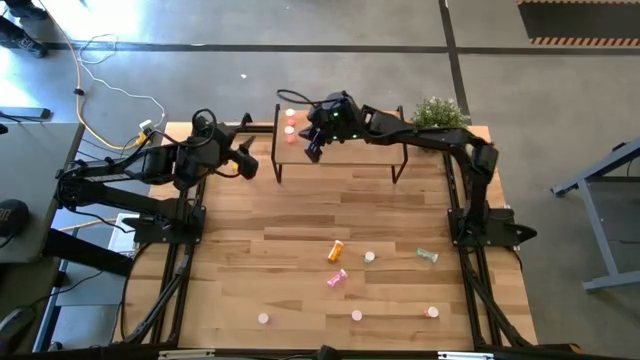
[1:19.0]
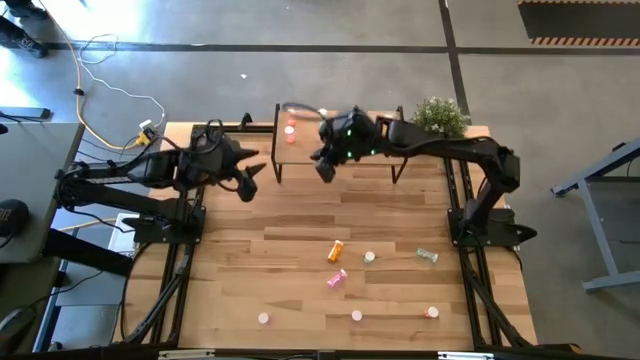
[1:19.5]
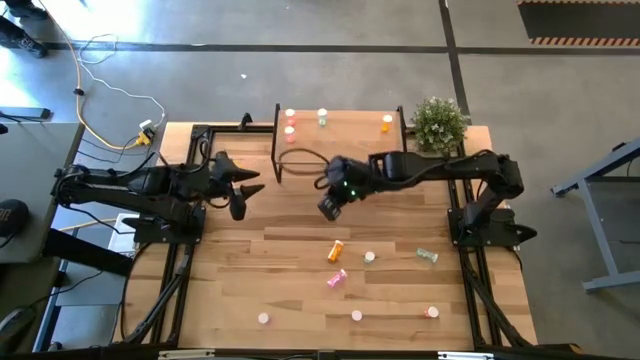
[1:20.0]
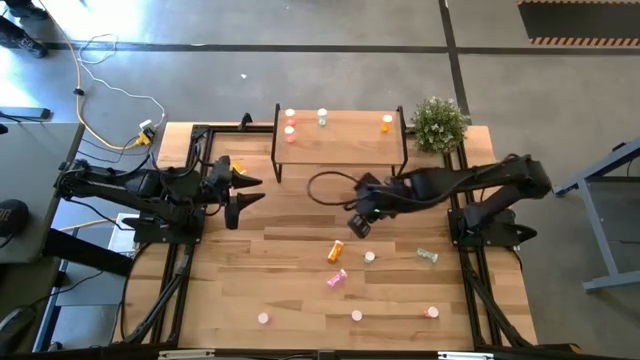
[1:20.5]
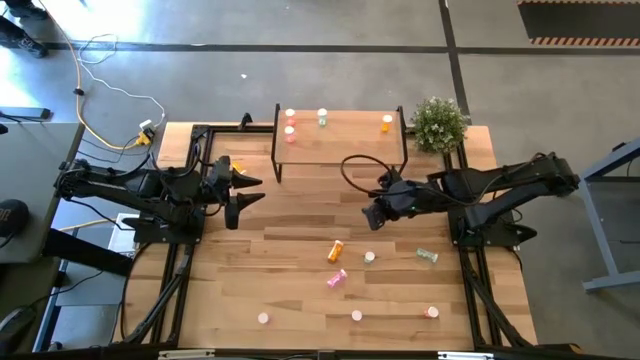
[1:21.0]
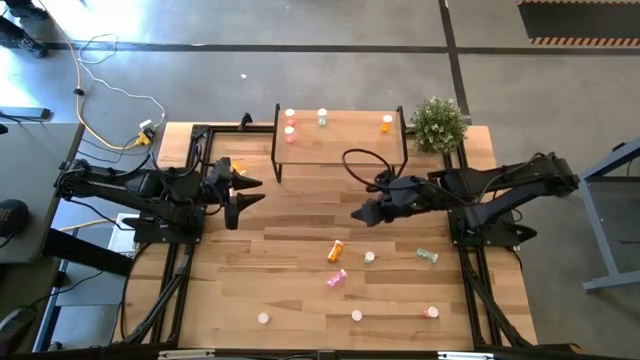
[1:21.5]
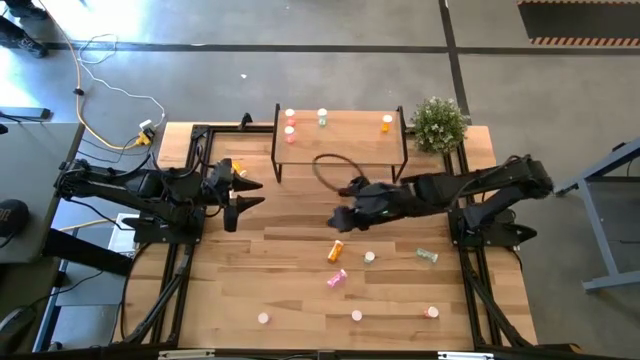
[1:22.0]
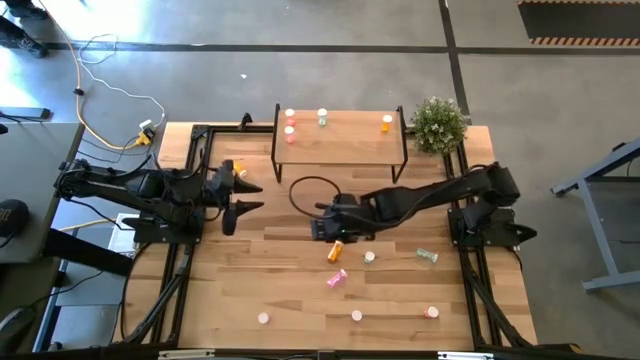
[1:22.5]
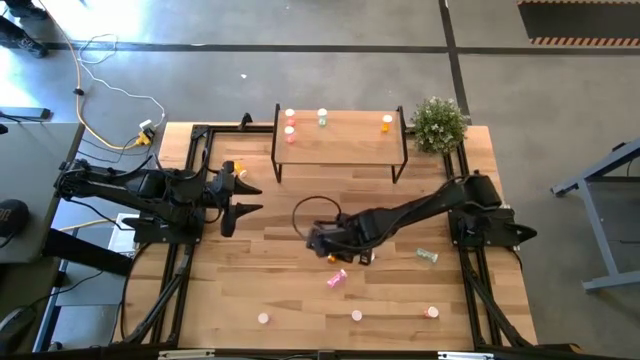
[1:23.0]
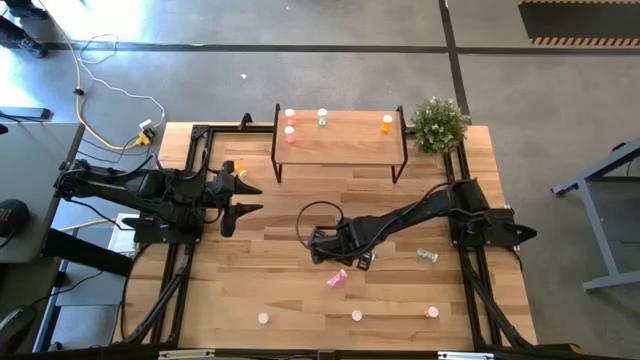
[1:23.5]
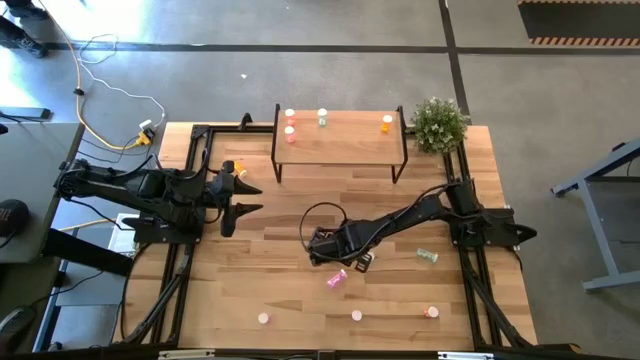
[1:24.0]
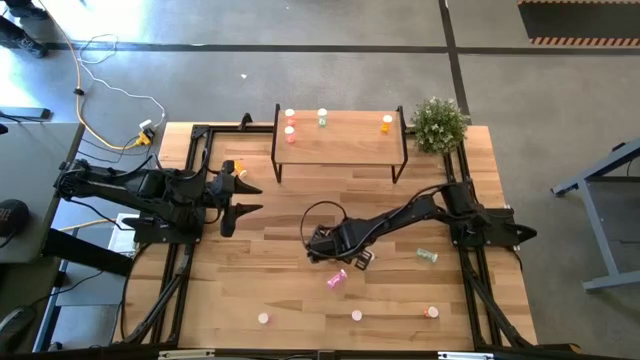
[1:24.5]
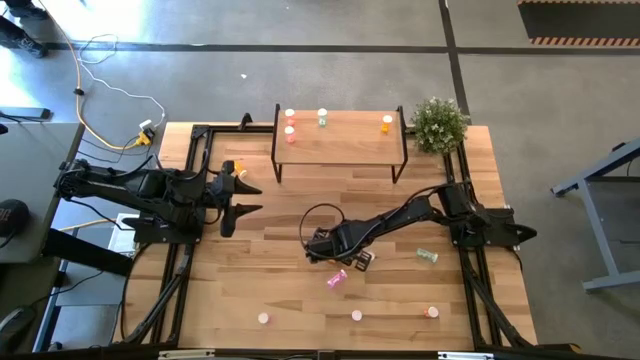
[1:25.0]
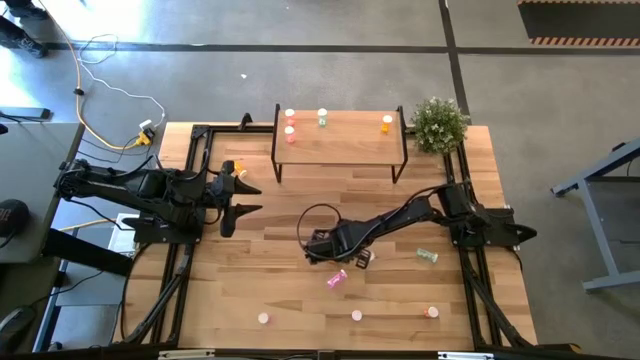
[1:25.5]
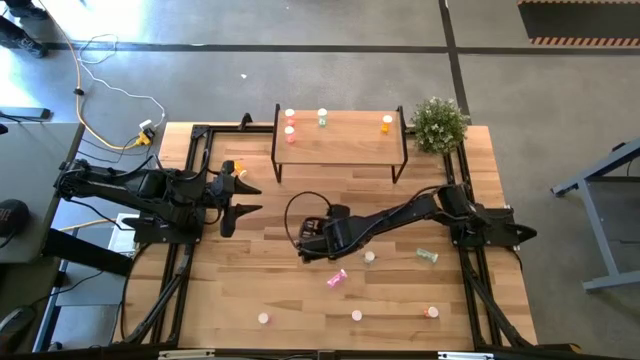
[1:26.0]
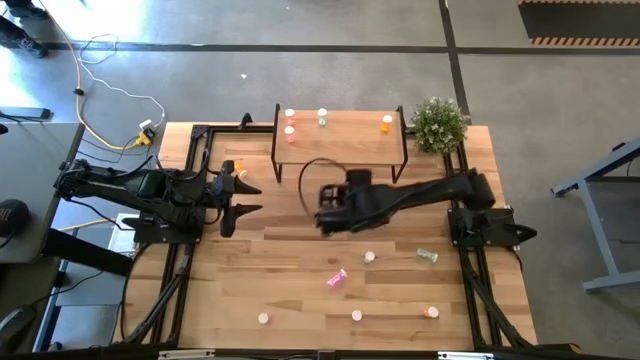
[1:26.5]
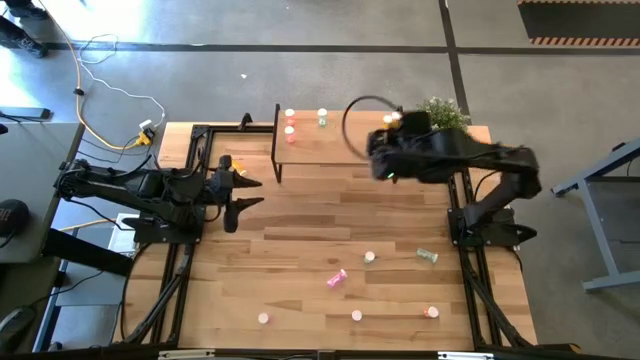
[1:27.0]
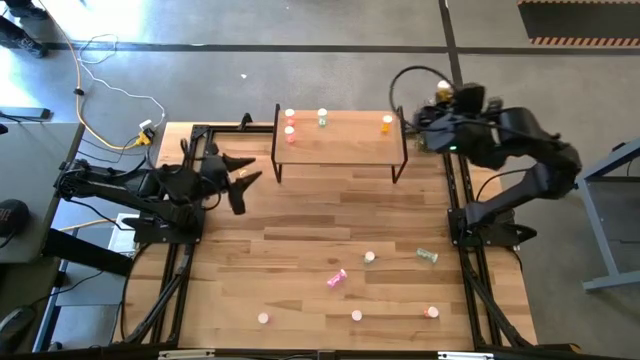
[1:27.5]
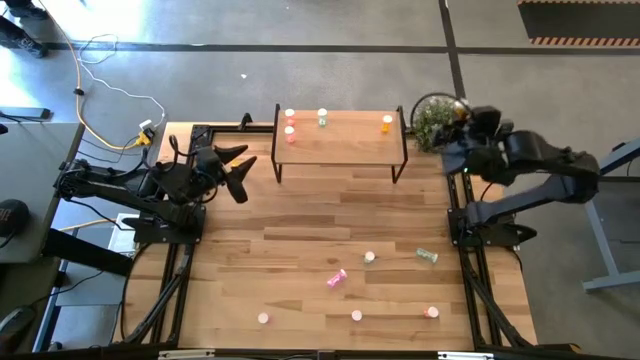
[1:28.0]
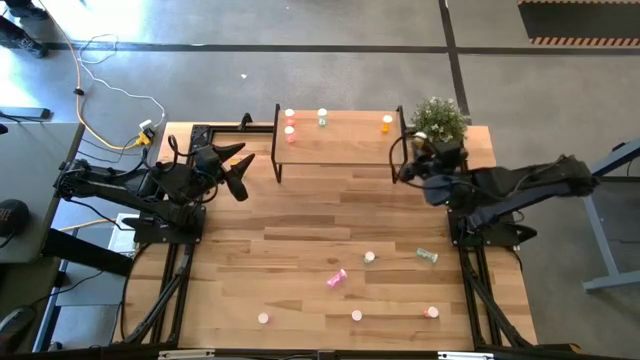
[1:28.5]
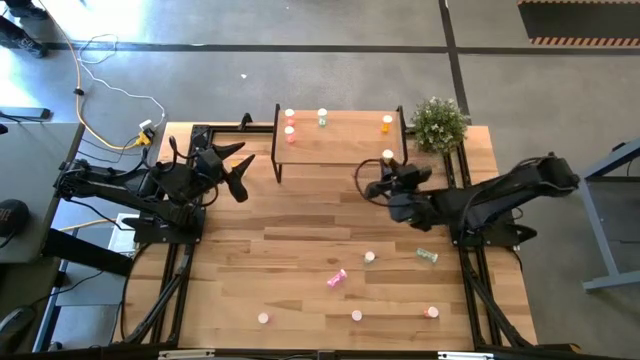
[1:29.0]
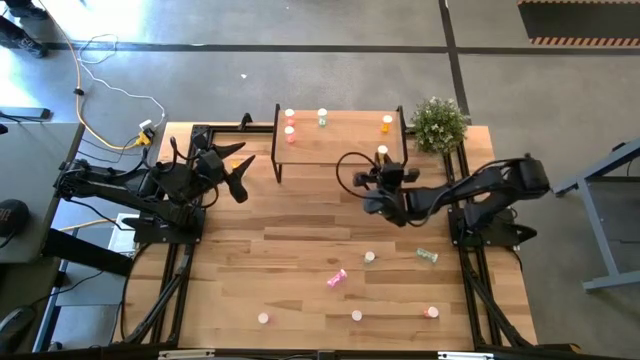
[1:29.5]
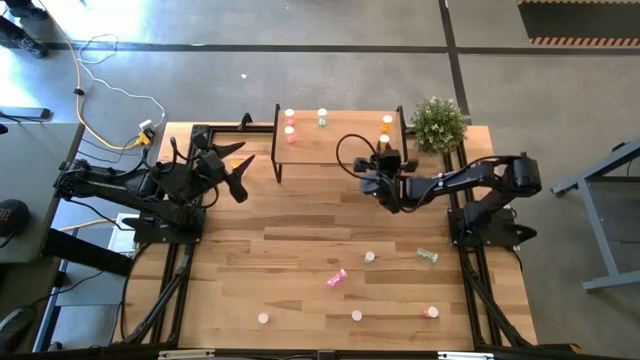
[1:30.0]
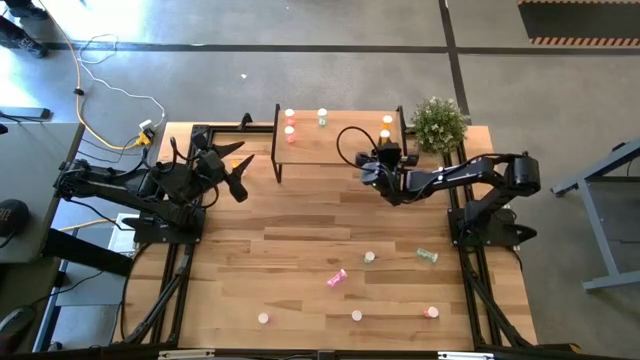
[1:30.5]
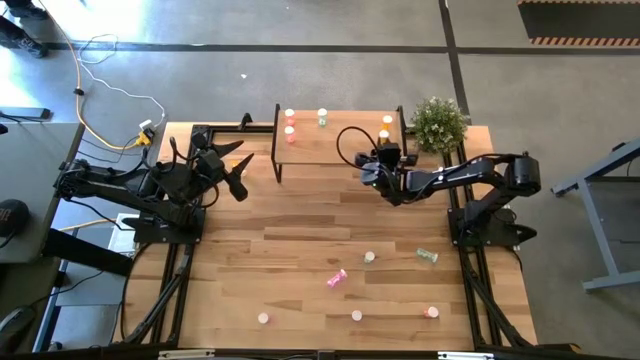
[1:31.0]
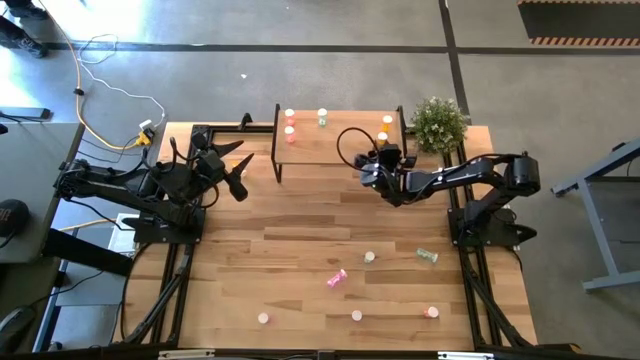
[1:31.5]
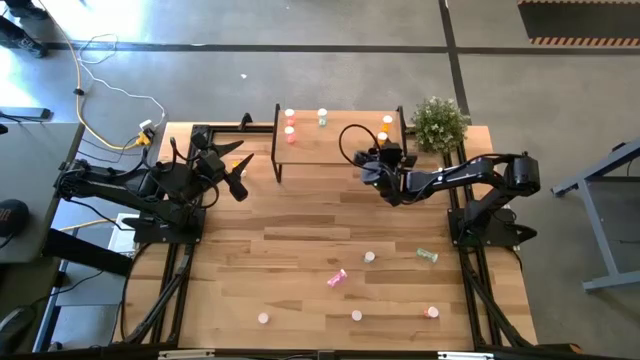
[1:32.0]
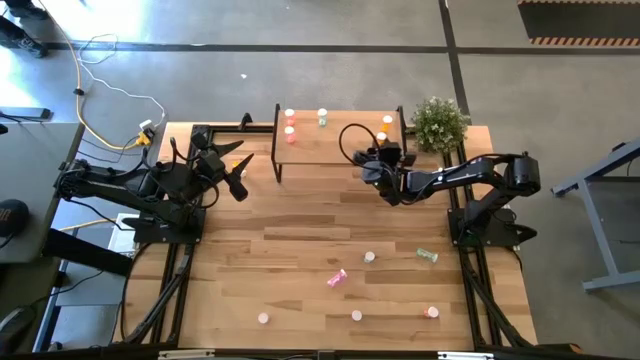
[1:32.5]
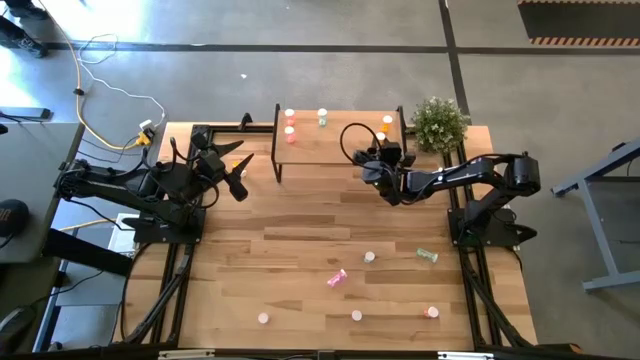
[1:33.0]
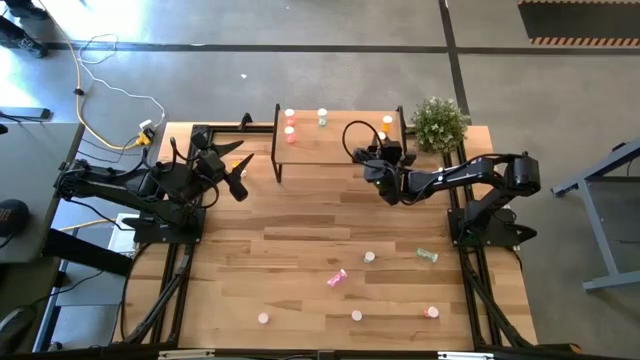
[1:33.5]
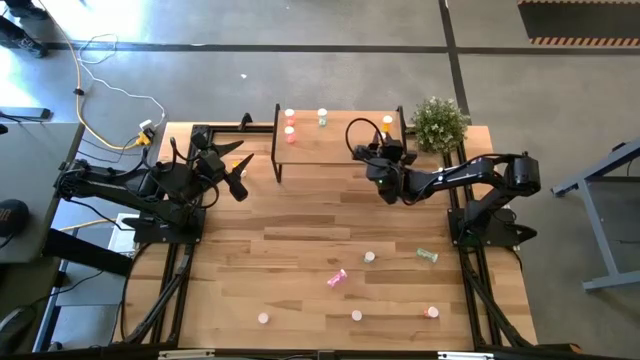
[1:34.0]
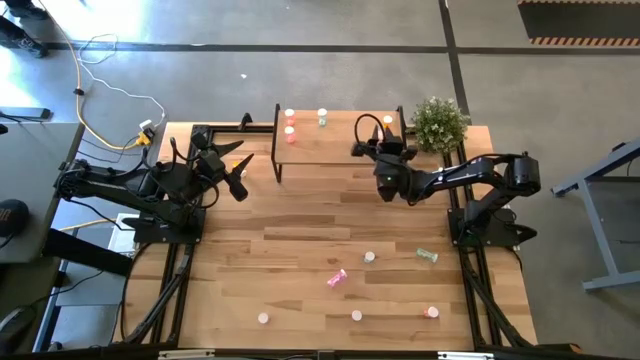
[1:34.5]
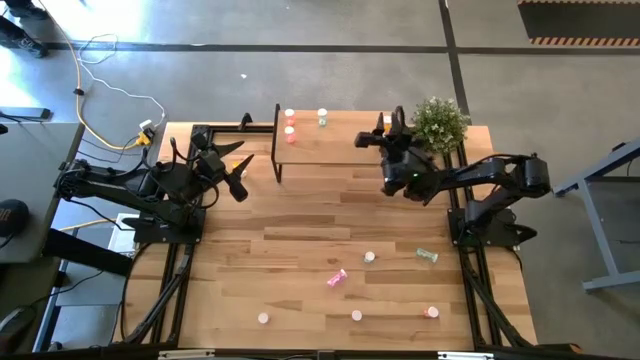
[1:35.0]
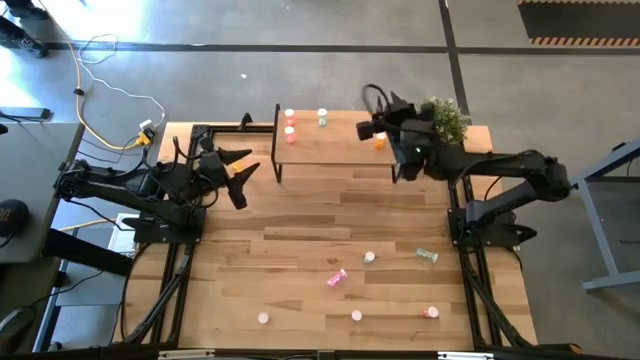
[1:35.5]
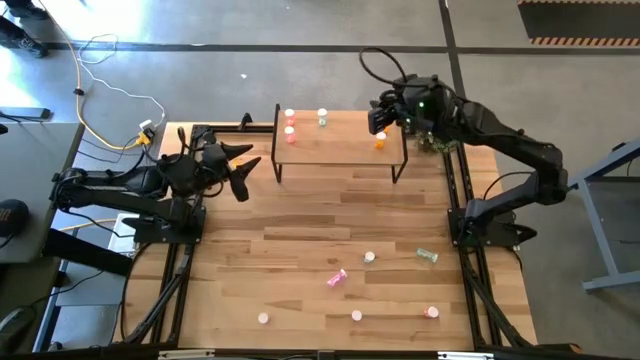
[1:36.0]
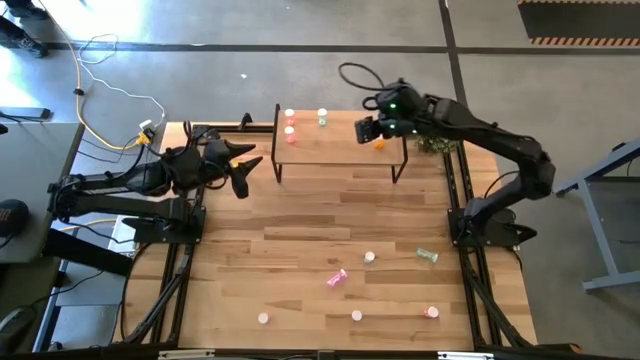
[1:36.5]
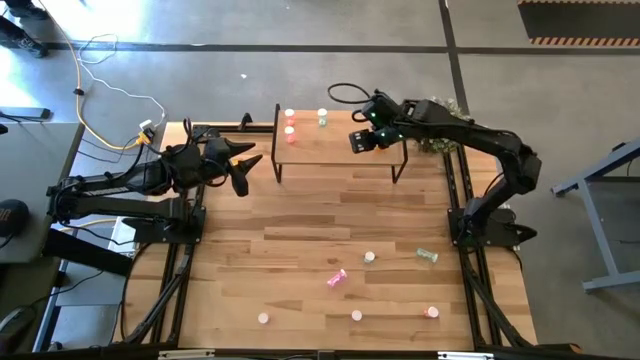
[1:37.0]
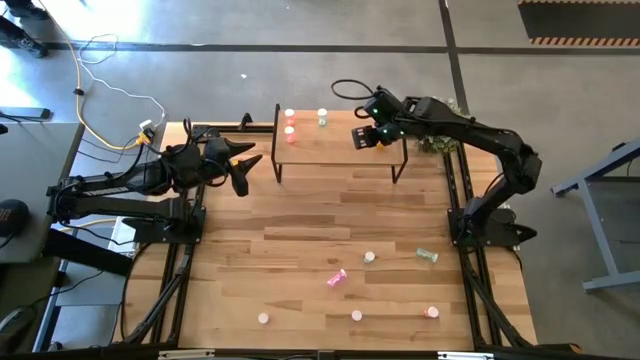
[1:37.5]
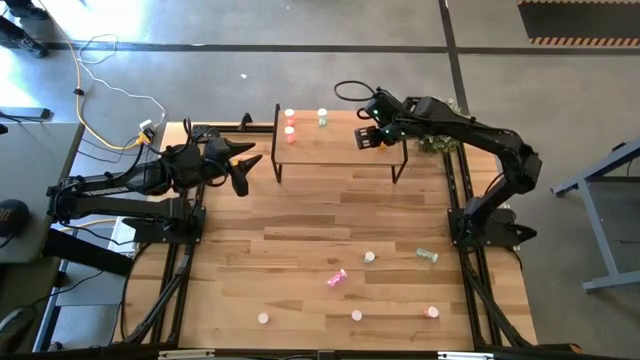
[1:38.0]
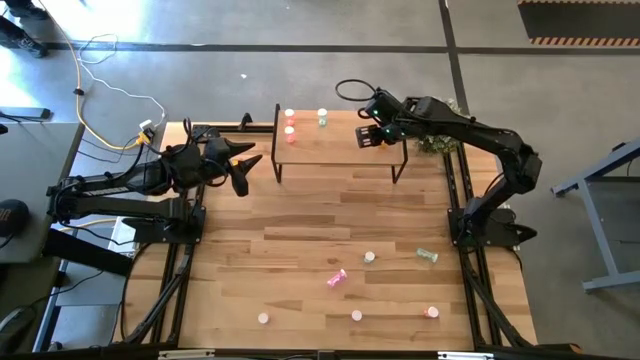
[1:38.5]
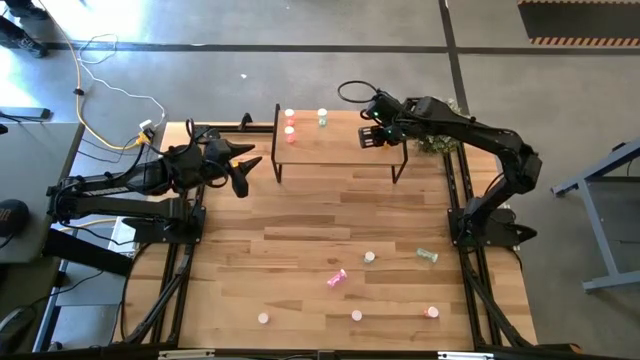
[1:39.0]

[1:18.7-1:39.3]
Task: Pick and place medicine bottles onto shelf by color
Put the bottom yellow pill bottle on the shelf aligned with the other yellow pill bottle
